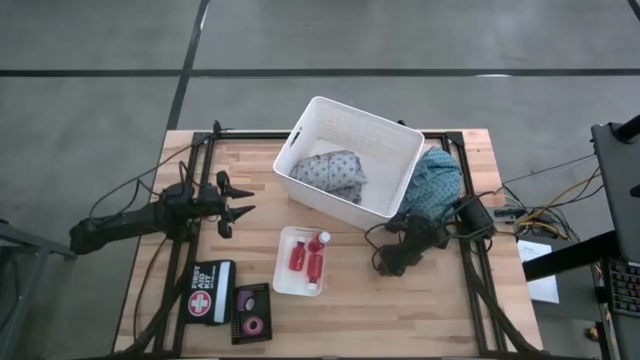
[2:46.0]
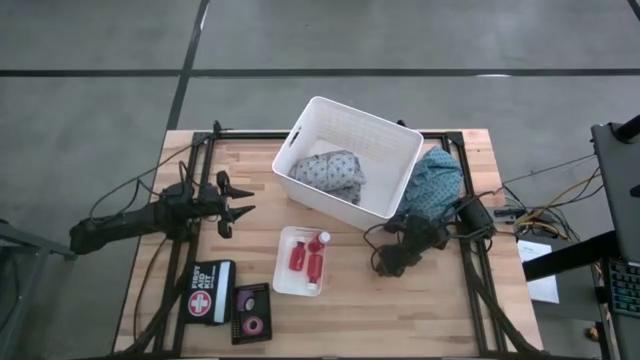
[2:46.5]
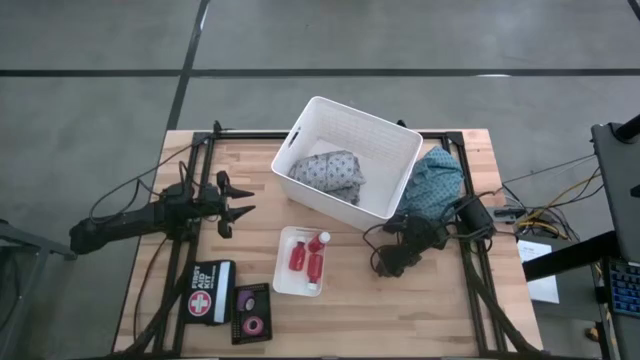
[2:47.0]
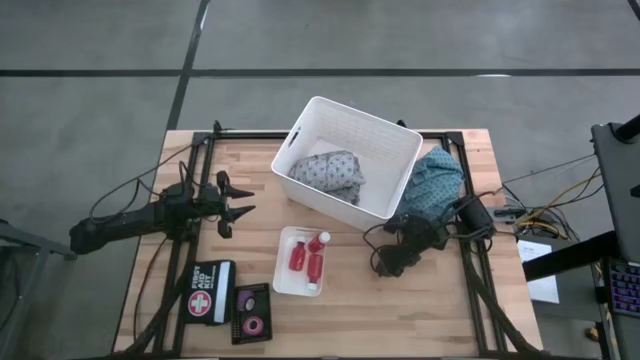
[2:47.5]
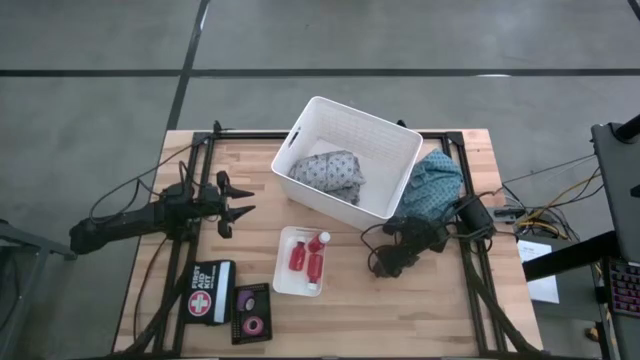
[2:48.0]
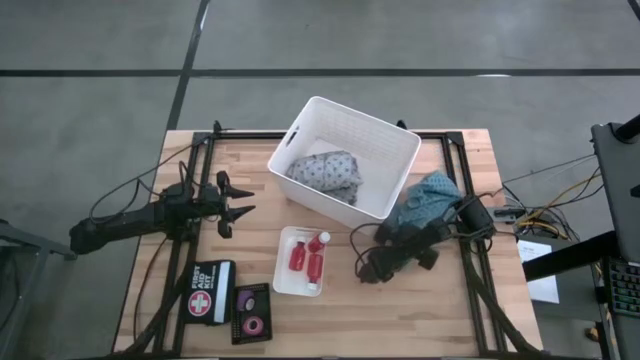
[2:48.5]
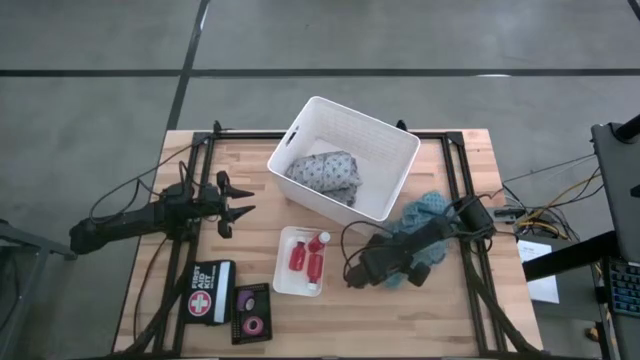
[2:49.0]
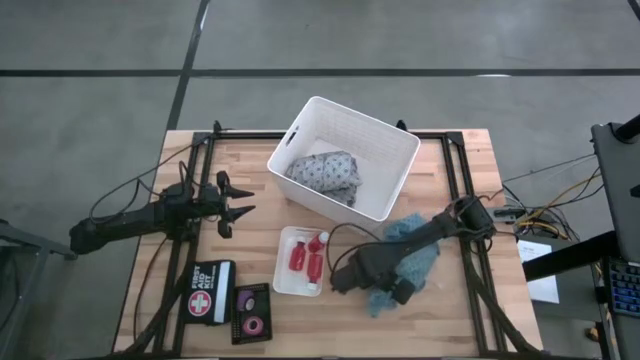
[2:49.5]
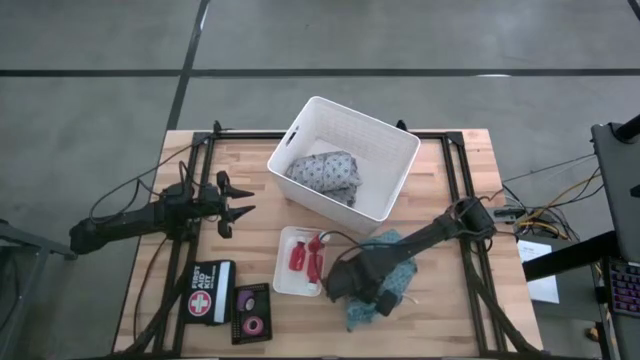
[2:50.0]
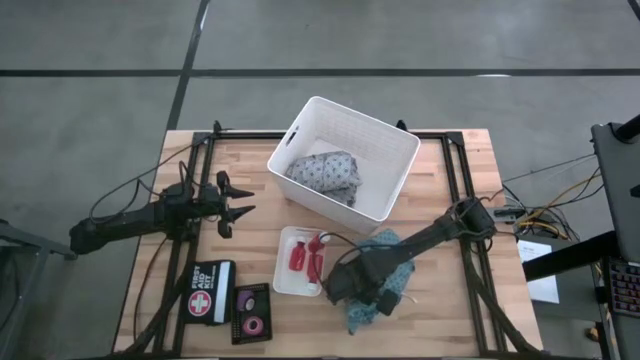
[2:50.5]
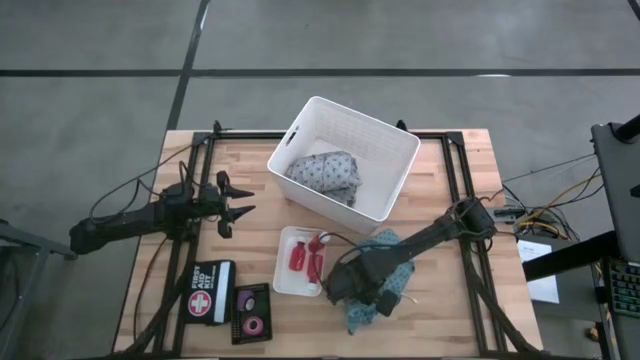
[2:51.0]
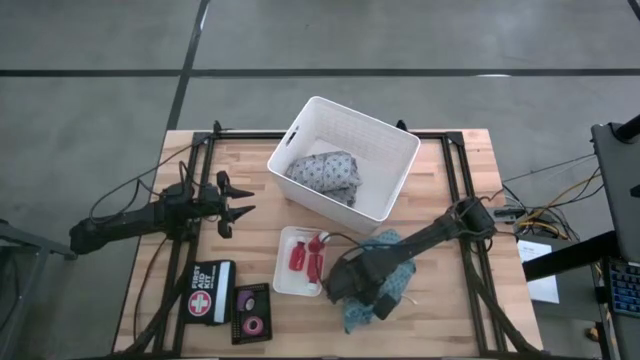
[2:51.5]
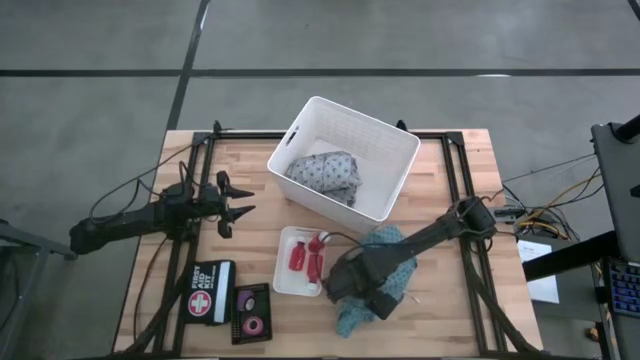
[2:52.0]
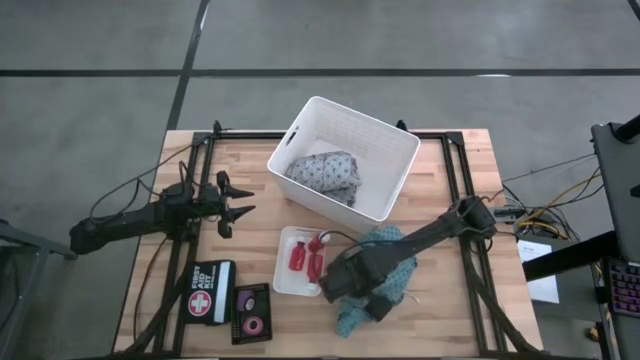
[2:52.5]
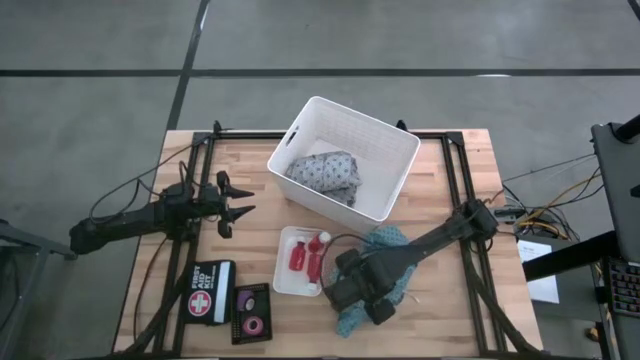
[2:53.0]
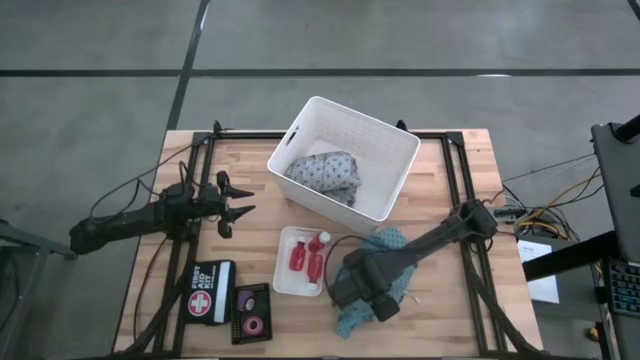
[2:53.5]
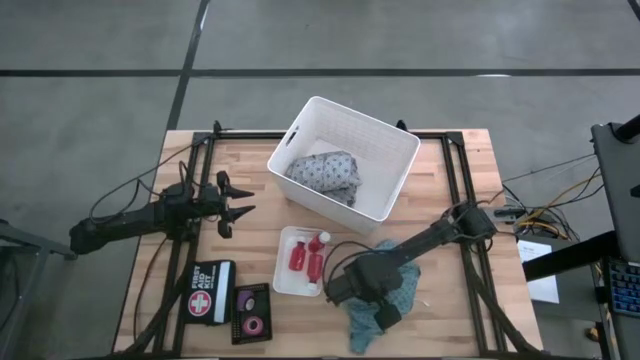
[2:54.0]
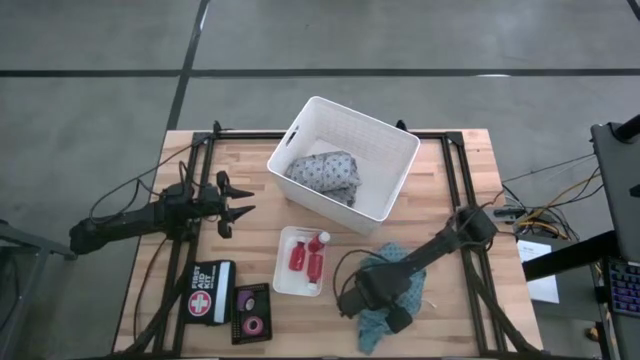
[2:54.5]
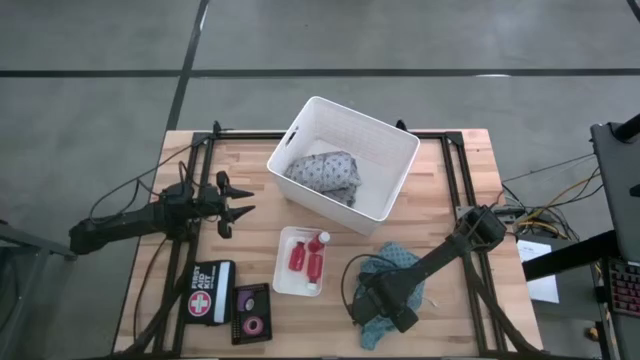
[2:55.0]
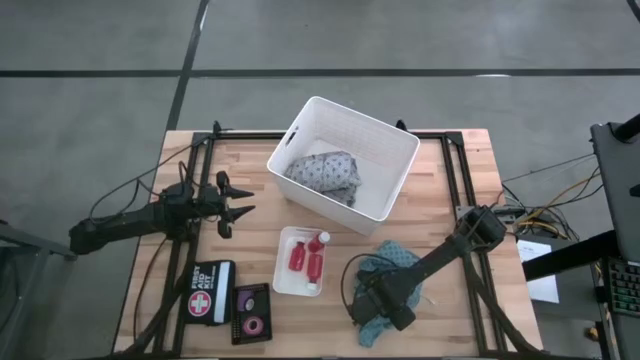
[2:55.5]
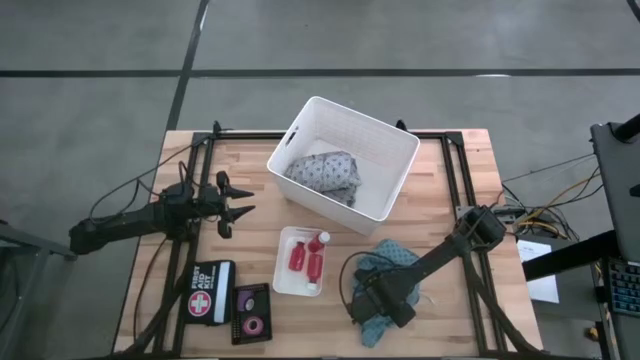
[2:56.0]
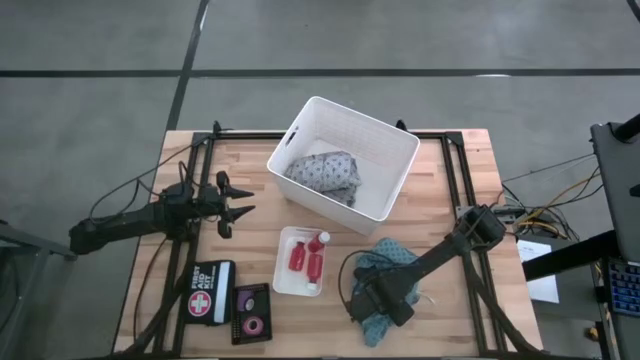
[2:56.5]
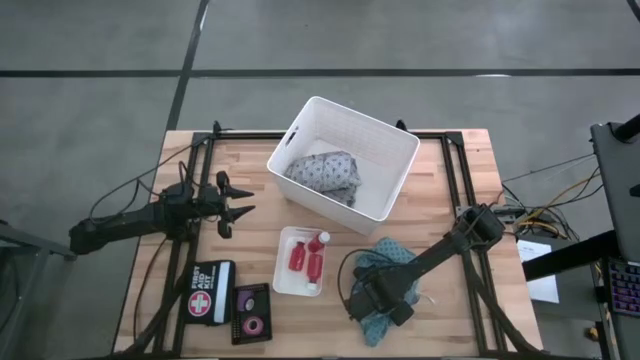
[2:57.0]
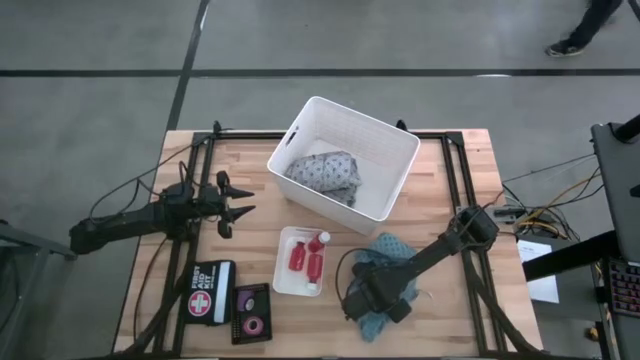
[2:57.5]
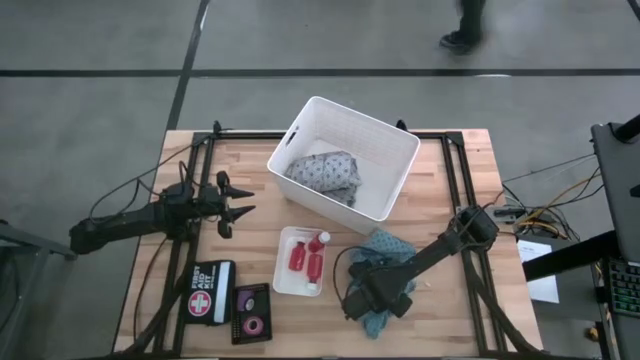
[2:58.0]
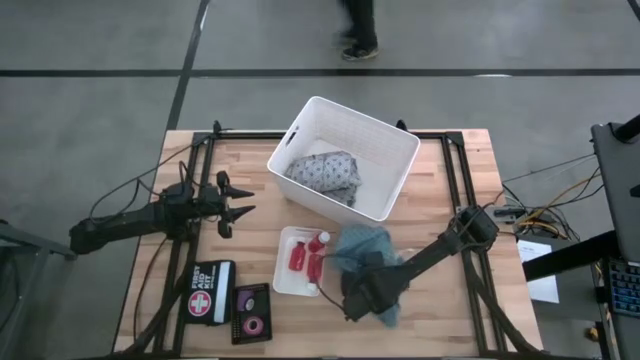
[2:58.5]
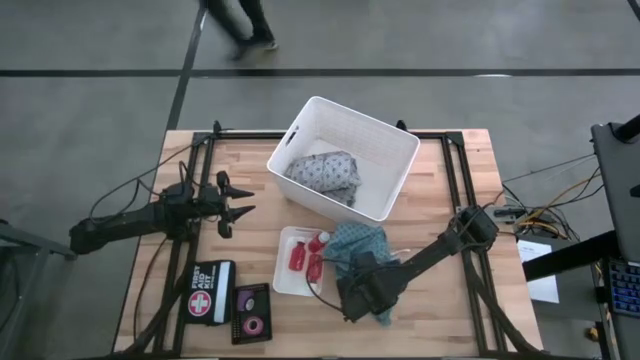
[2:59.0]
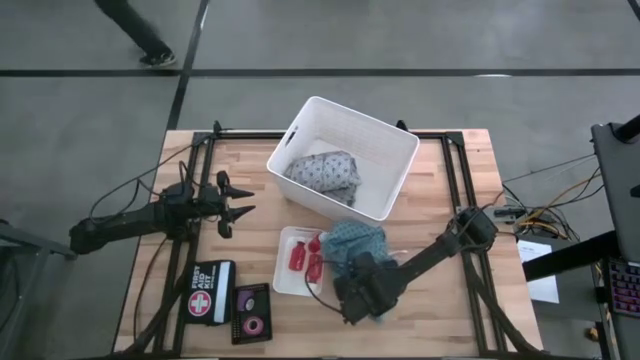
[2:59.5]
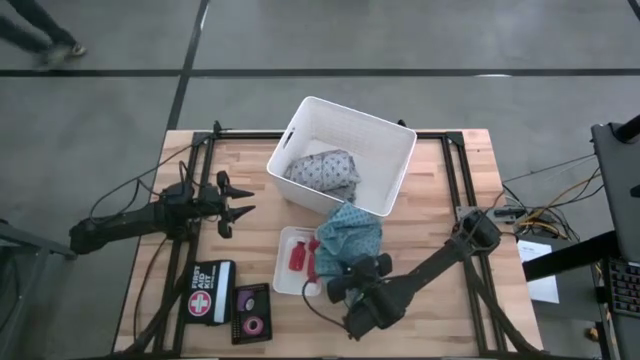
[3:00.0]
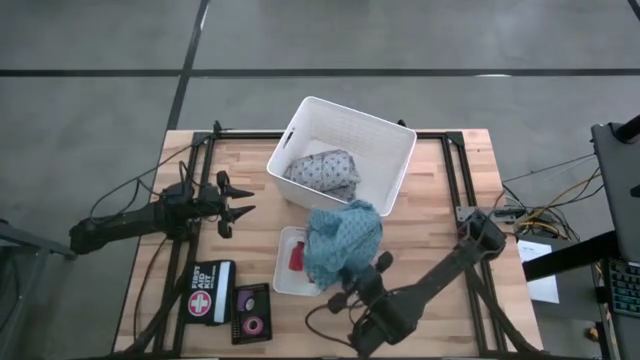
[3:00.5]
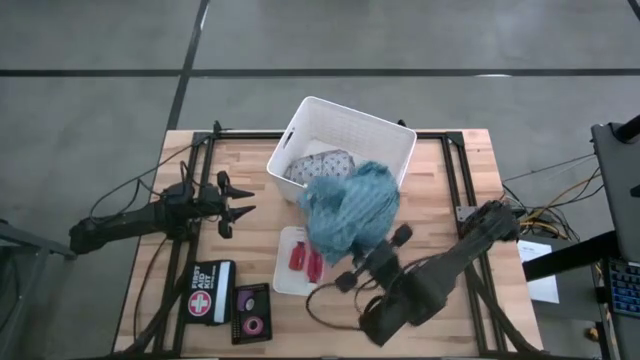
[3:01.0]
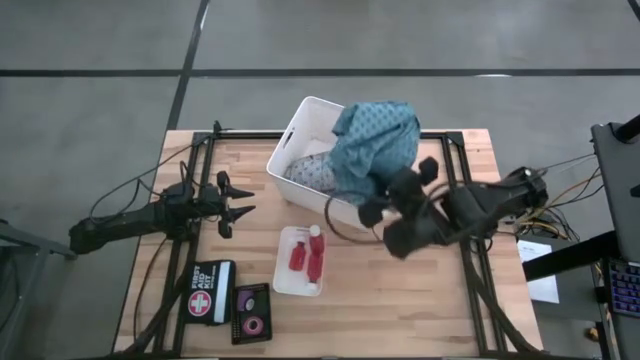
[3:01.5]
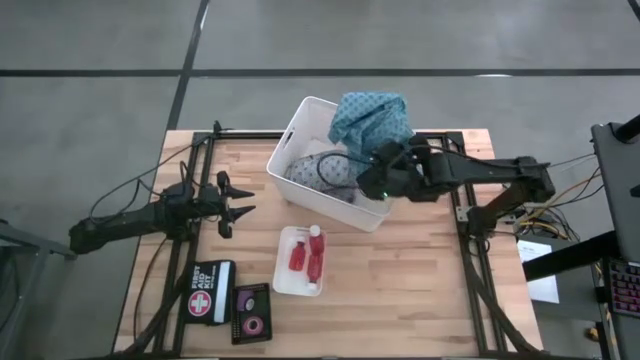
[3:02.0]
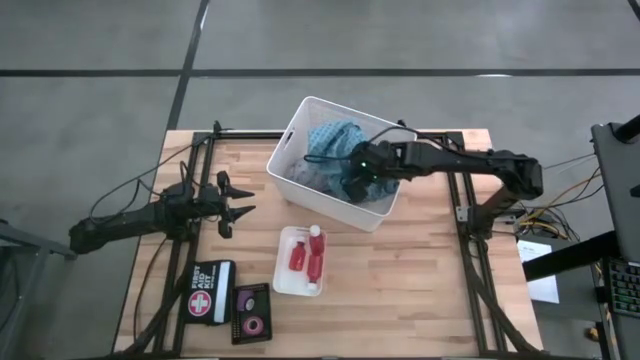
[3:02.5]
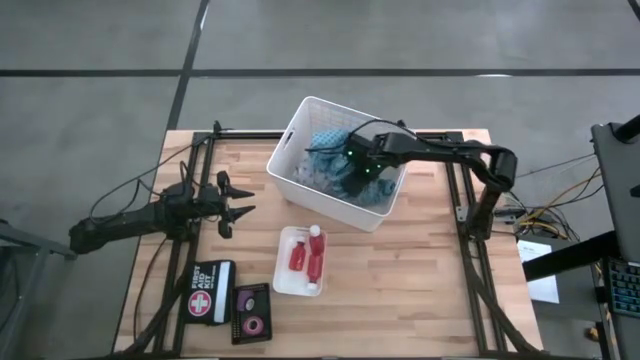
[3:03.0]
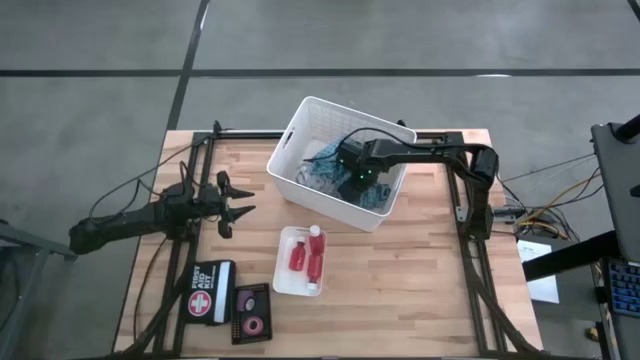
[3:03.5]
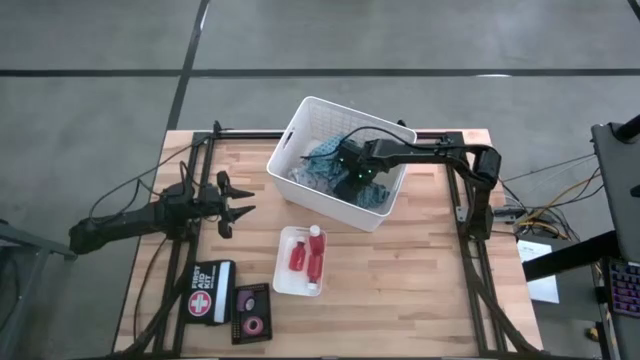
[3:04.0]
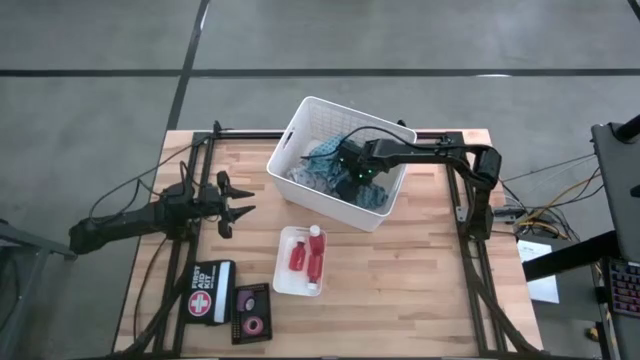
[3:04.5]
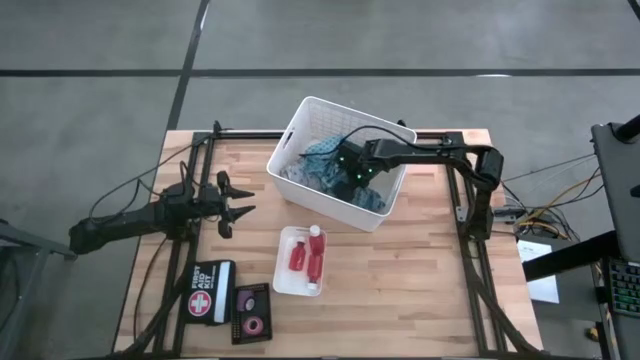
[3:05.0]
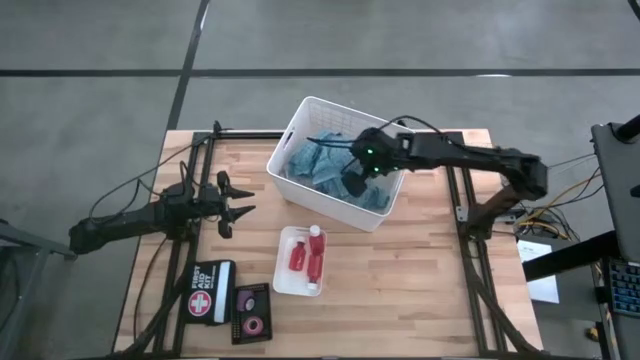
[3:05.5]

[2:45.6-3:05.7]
Task: Pick & Place Medicine items
Put the blue patient gown into the big white bin

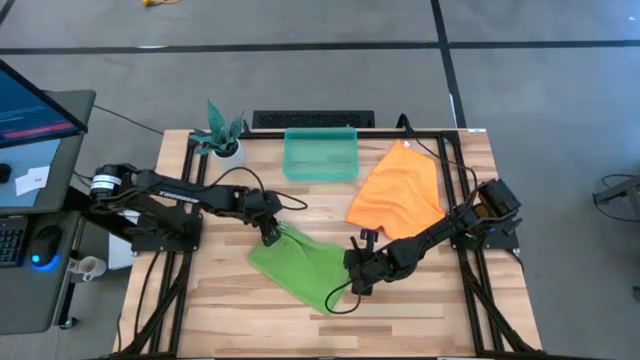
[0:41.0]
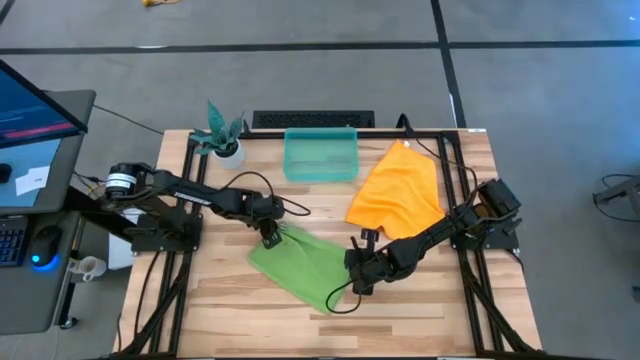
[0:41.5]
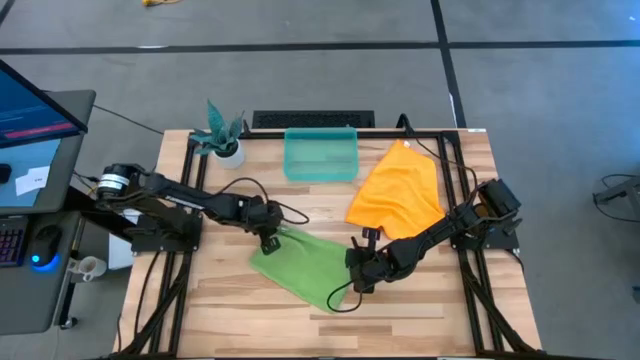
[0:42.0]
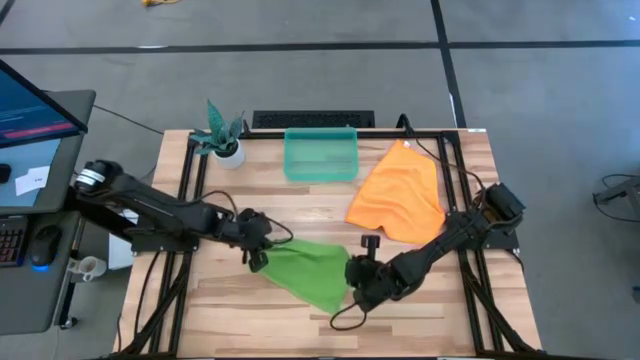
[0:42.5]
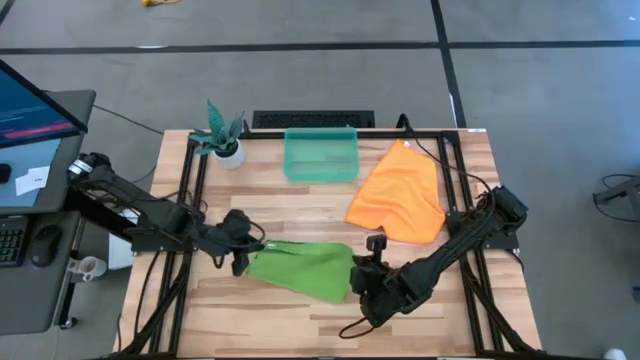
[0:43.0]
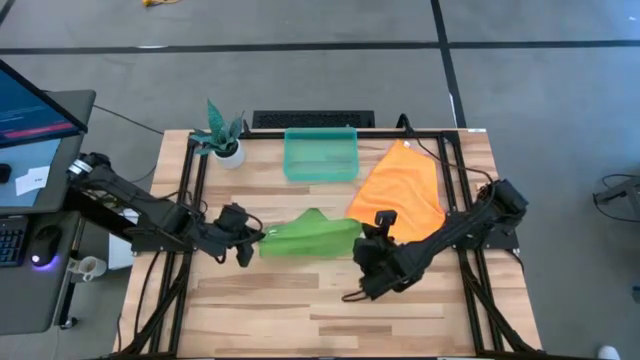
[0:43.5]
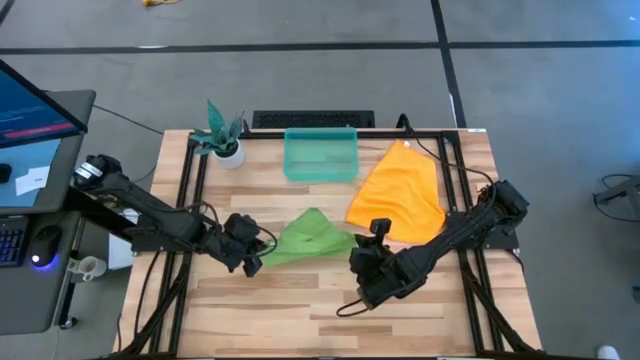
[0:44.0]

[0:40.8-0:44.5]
Task: Roll microfiber towels into tight, uniform cylinder then place into a basket
Fold the green towel
